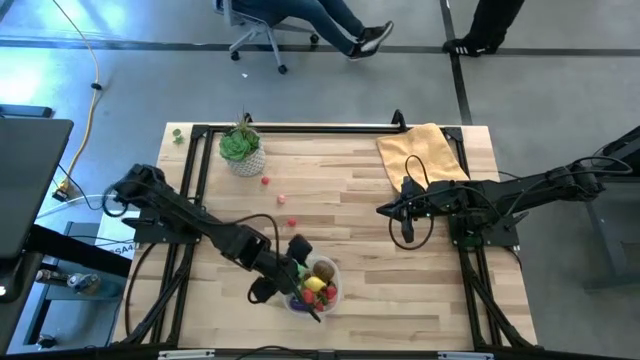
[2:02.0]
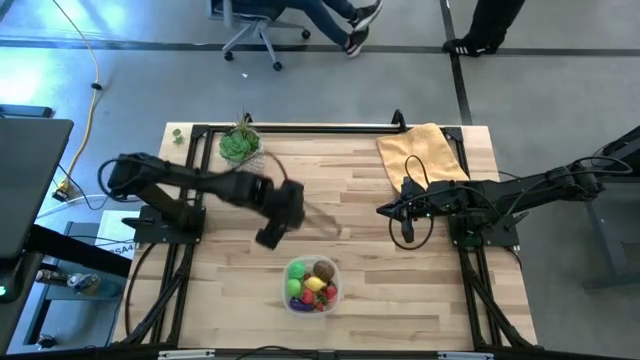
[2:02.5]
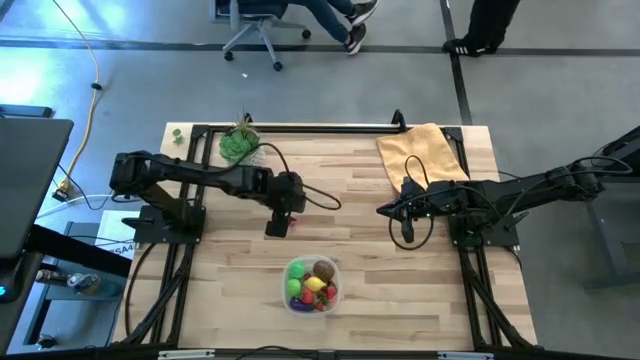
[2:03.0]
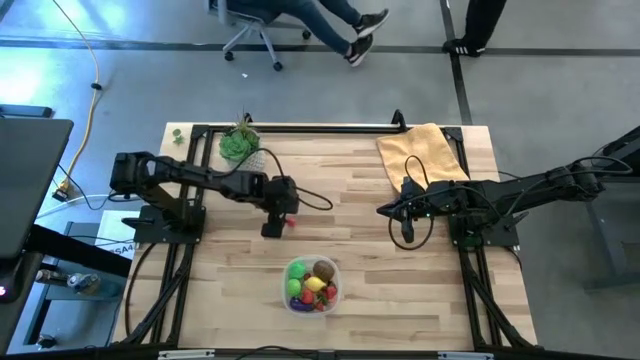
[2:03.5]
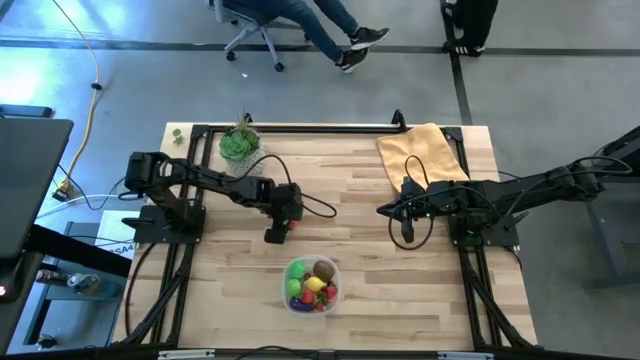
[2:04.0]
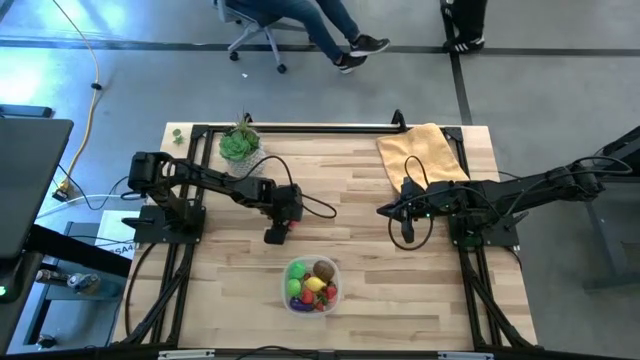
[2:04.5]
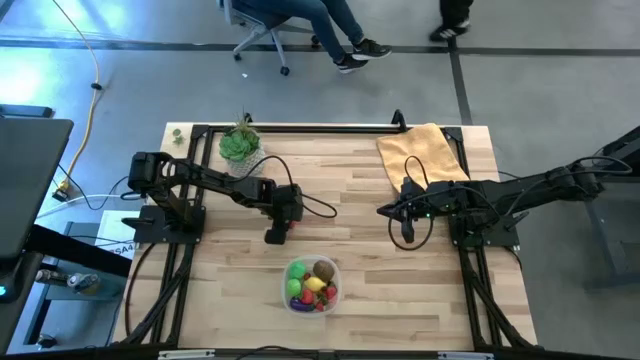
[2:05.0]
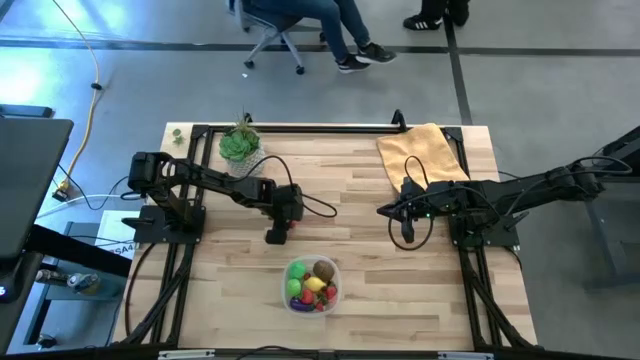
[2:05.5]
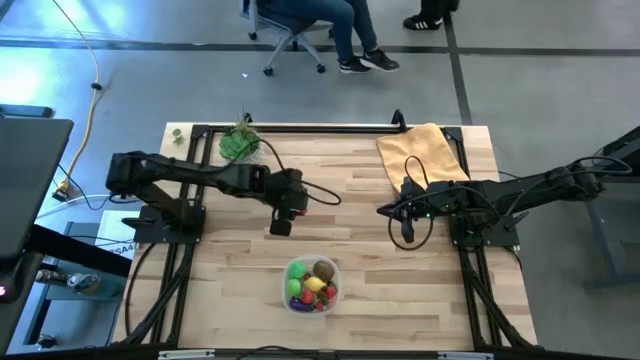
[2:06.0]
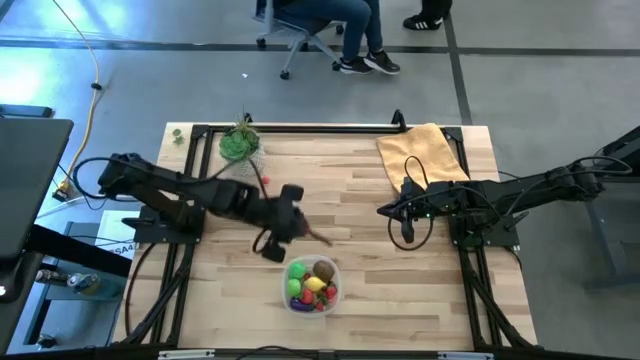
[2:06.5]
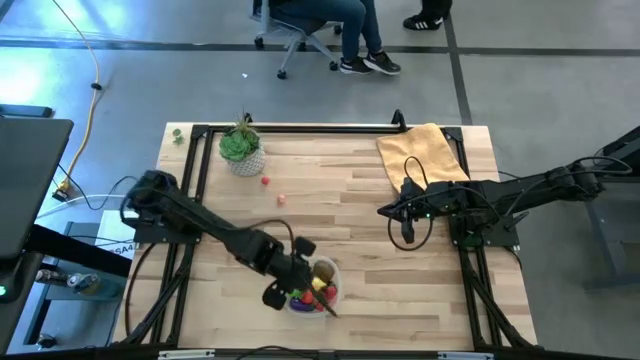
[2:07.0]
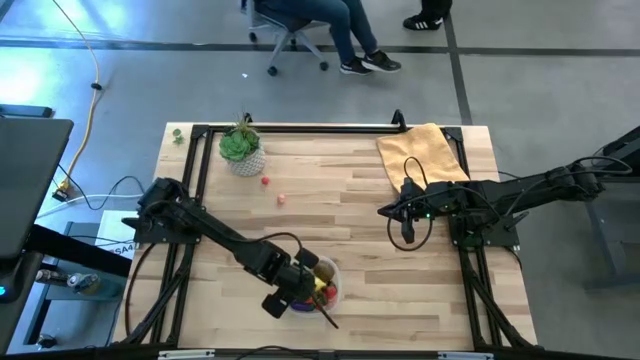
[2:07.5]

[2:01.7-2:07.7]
Task: Pick and placing Produce into tupperware
Put the red cherry into the transparent bin

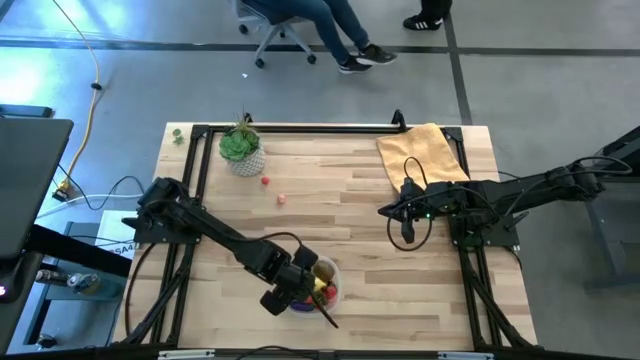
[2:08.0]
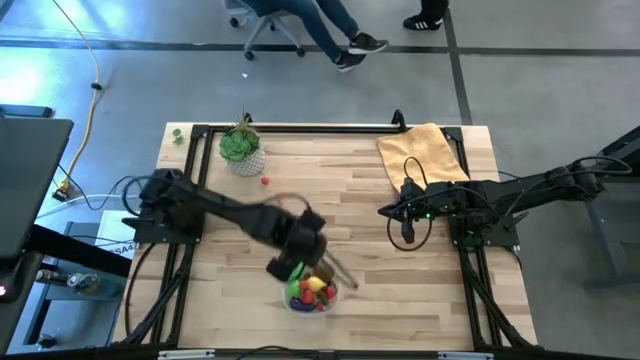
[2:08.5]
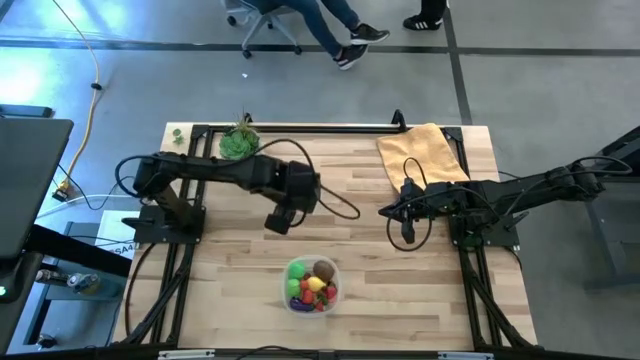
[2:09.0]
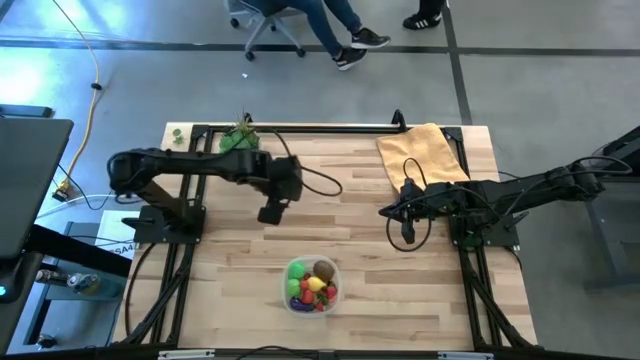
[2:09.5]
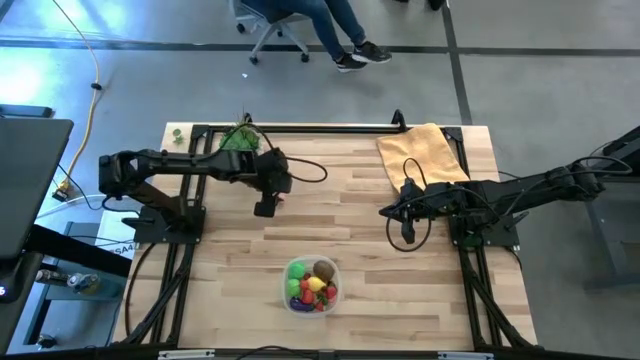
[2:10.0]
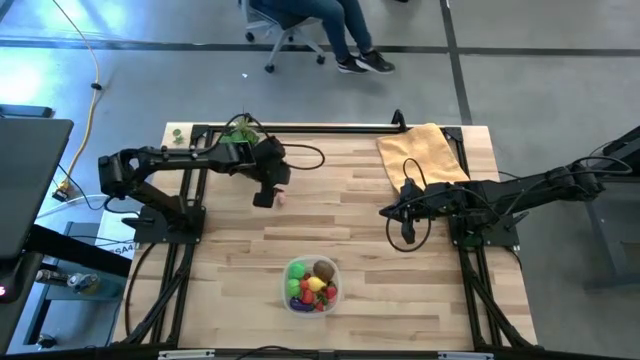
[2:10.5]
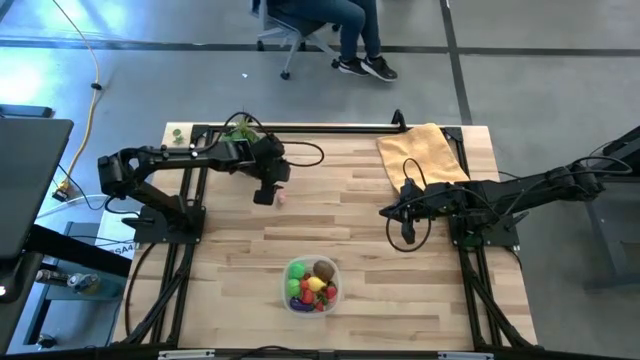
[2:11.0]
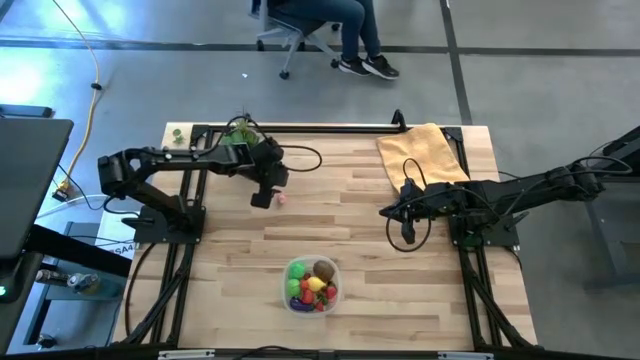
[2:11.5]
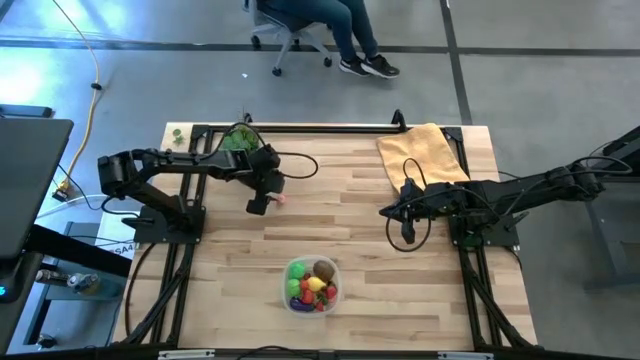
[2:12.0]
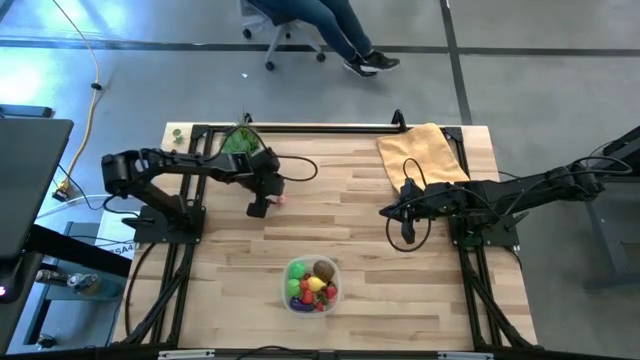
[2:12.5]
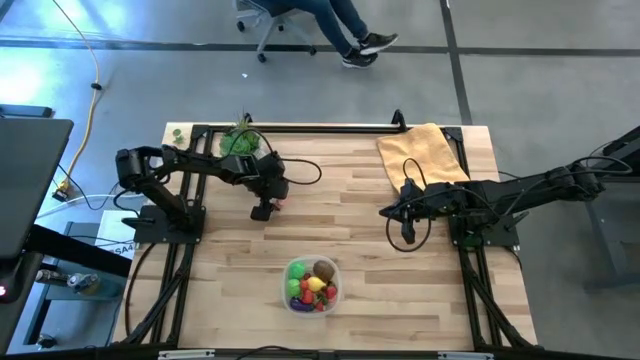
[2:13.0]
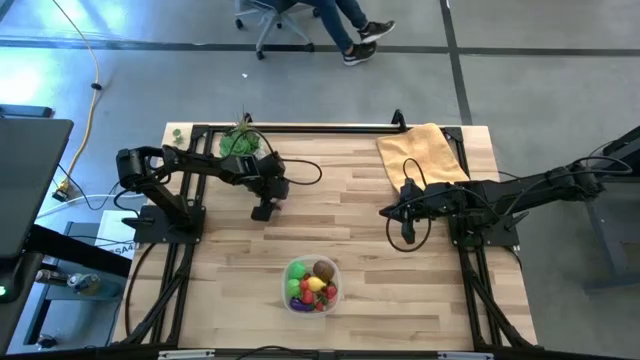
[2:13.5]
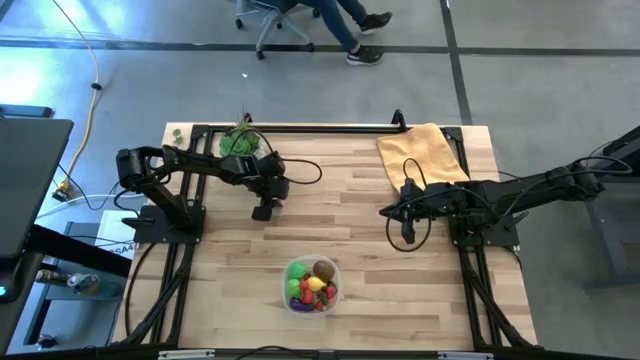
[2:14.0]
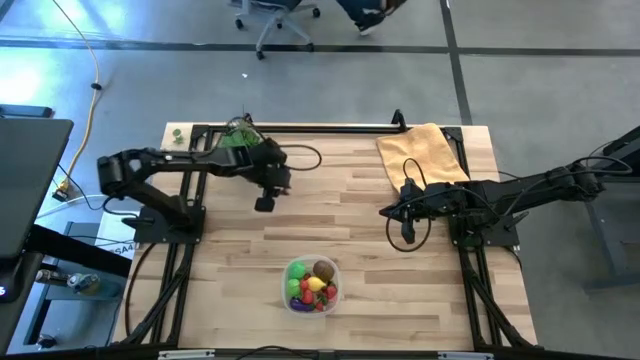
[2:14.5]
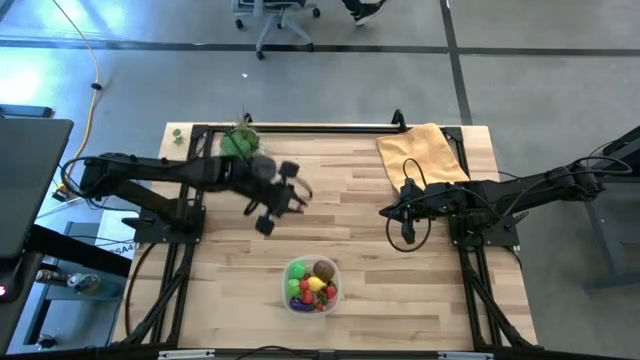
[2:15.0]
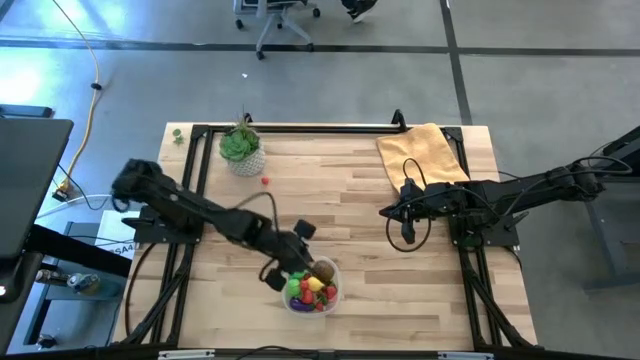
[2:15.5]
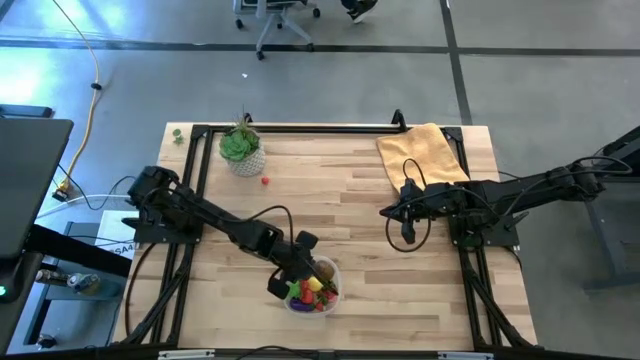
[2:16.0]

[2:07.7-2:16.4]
Put the pink peach into the transparent bin

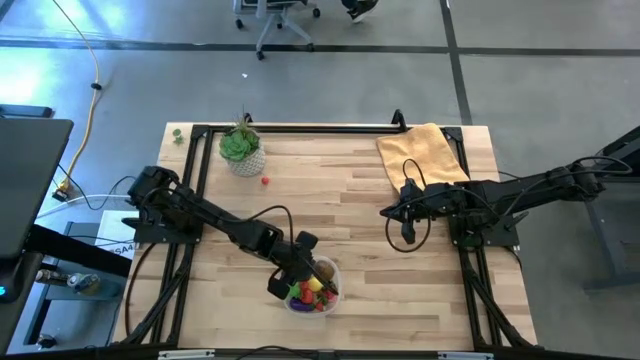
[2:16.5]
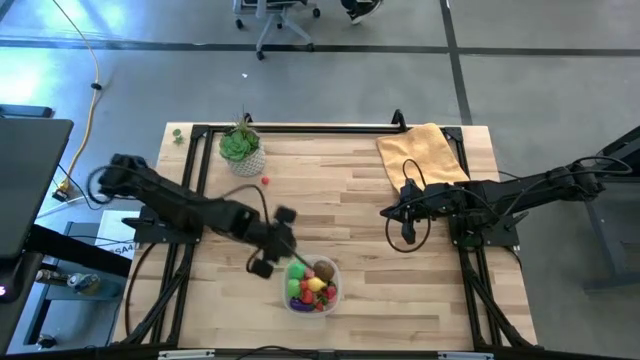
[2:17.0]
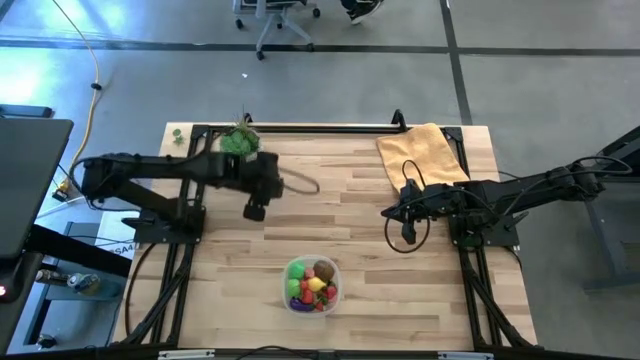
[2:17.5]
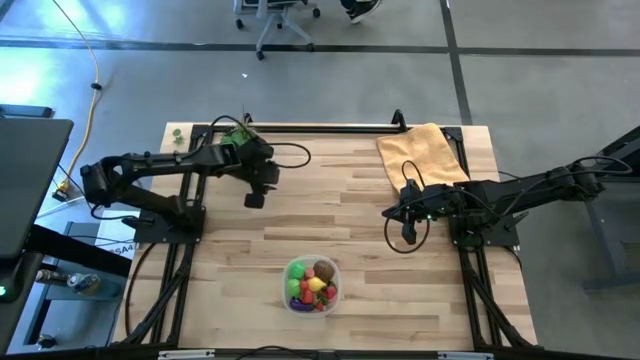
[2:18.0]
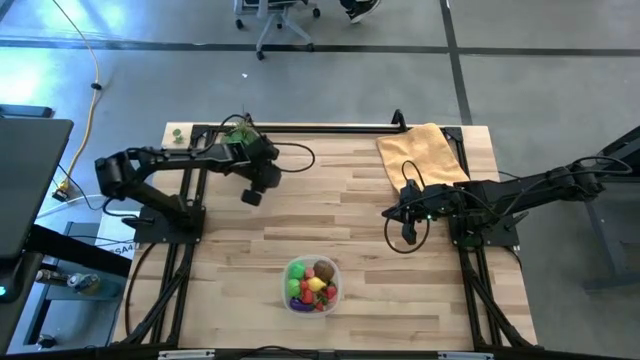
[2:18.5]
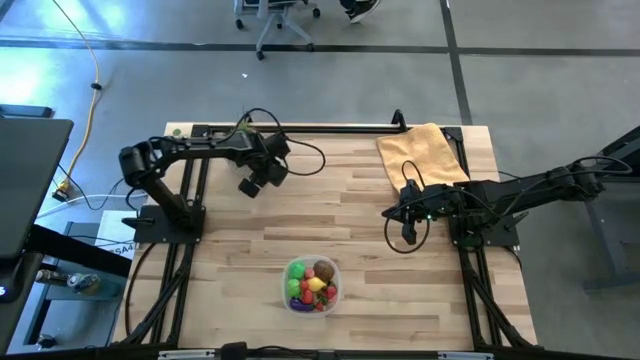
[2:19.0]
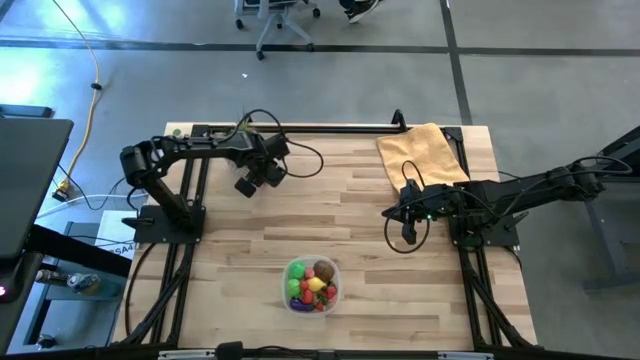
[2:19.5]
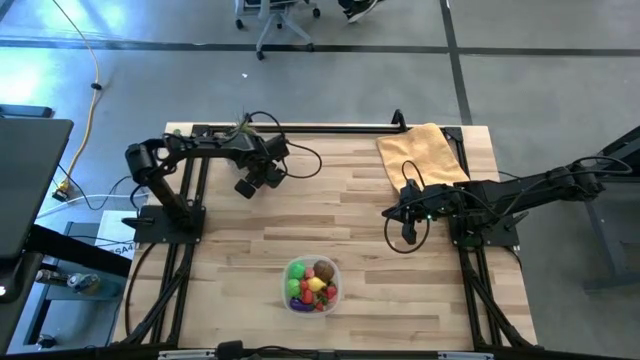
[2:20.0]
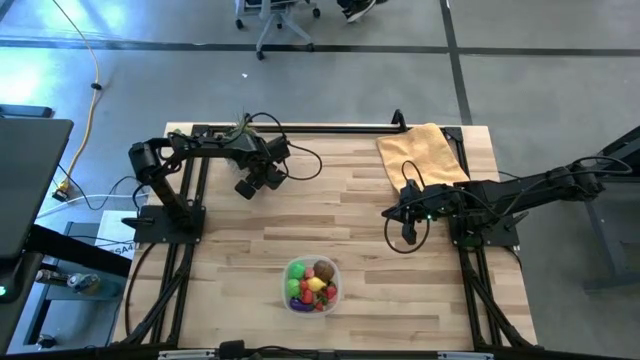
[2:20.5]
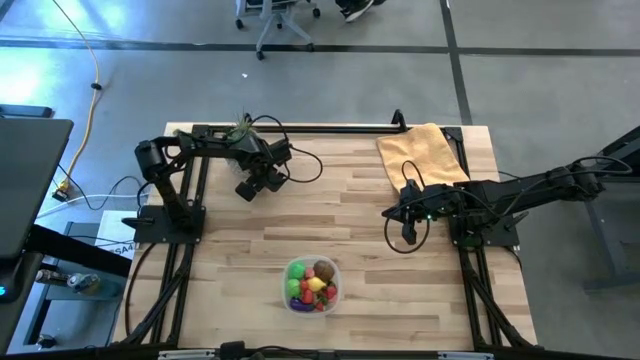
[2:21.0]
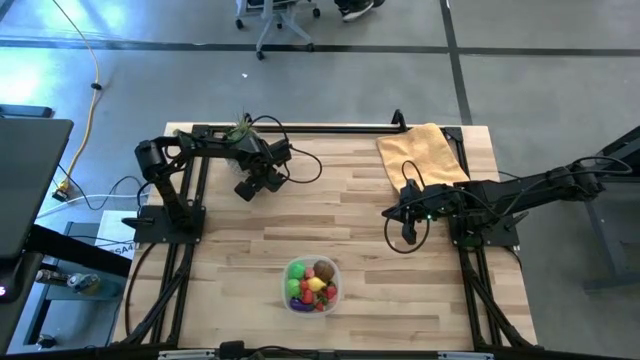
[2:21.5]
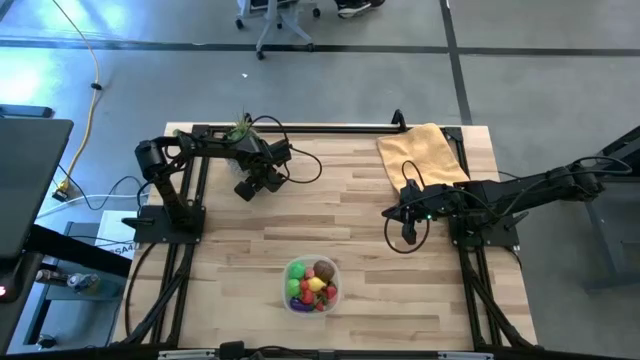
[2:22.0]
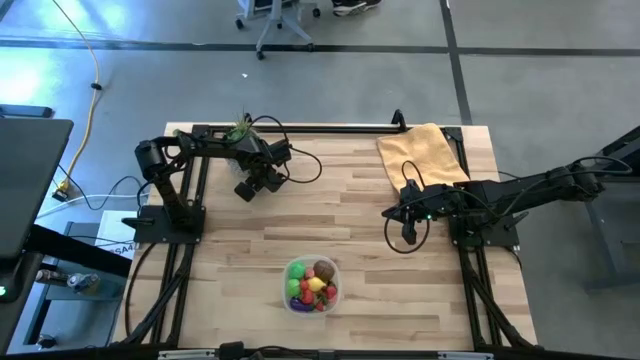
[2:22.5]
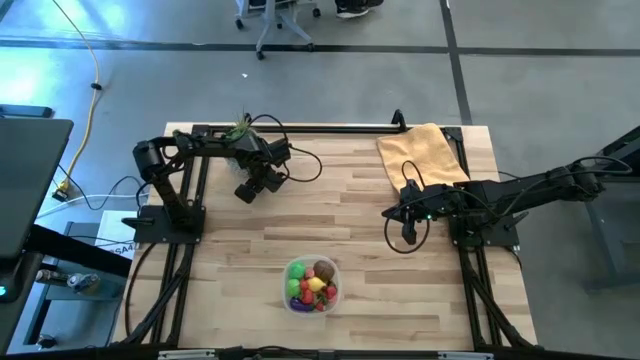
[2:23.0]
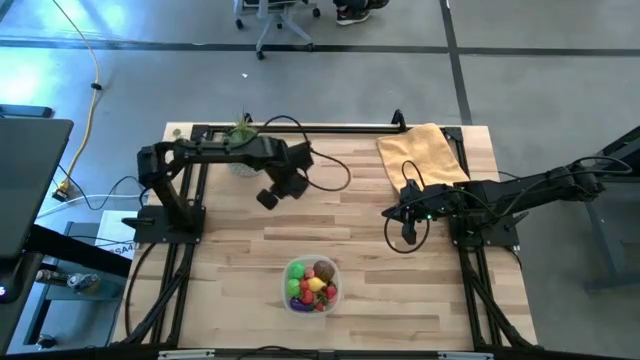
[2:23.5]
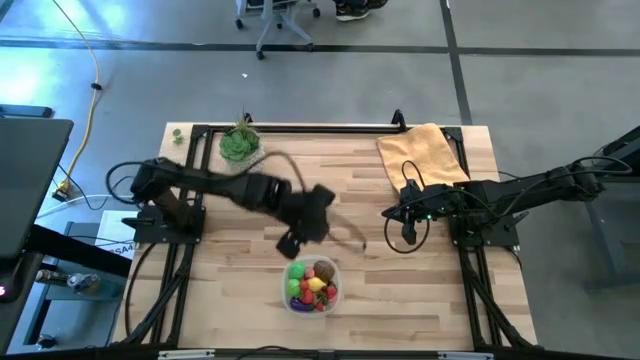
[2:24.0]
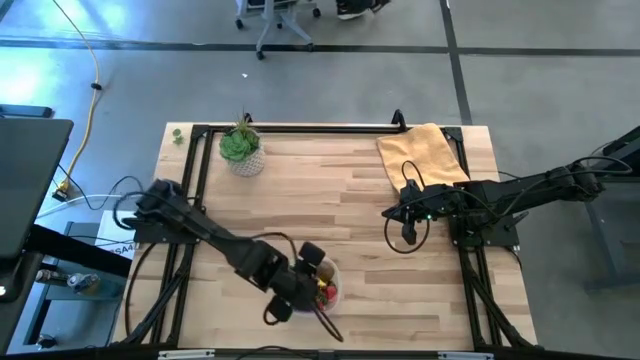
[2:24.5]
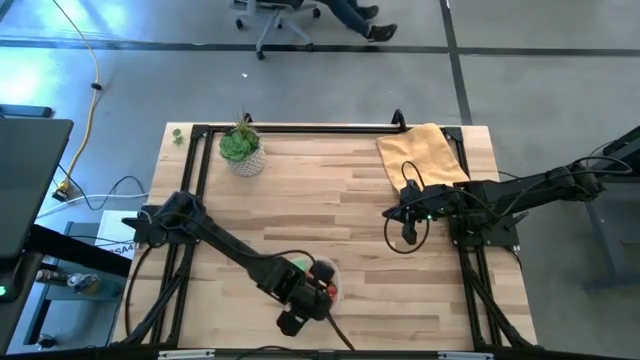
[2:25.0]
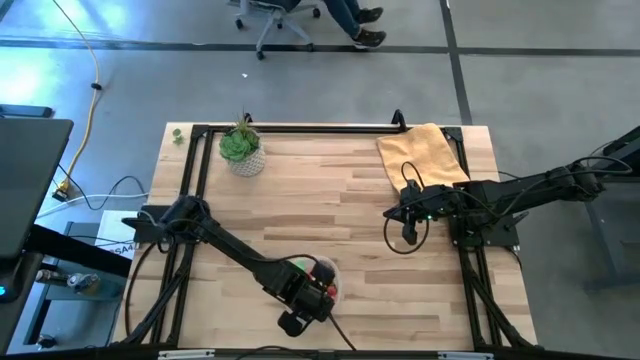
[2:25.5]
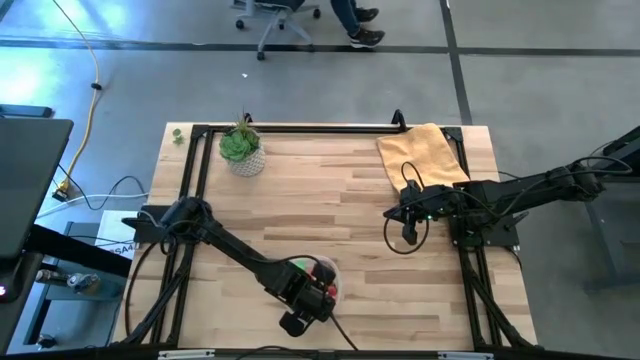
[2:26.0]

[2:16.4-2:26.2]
Put the red cherry into the transparent bin
